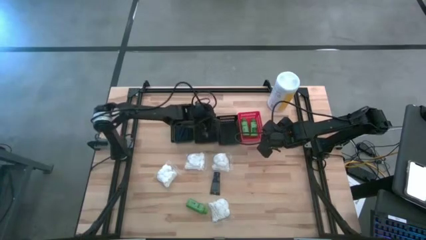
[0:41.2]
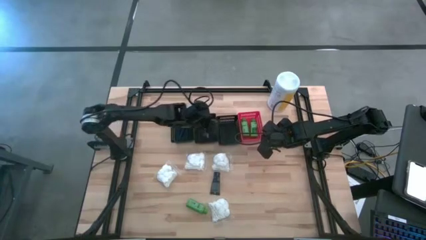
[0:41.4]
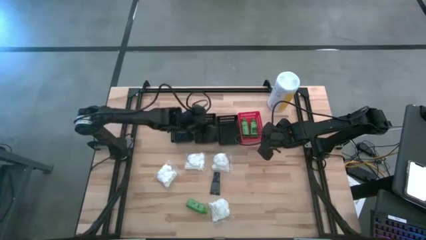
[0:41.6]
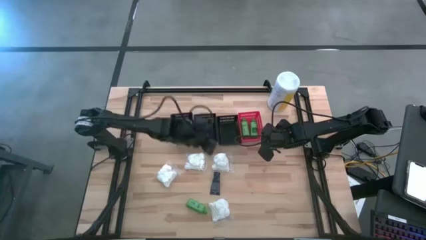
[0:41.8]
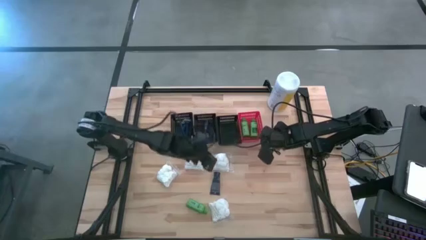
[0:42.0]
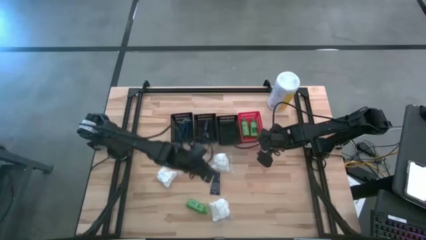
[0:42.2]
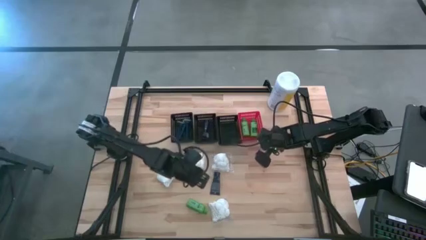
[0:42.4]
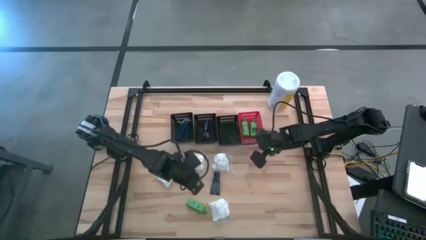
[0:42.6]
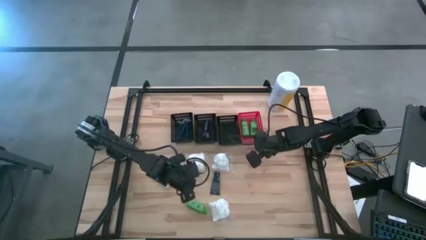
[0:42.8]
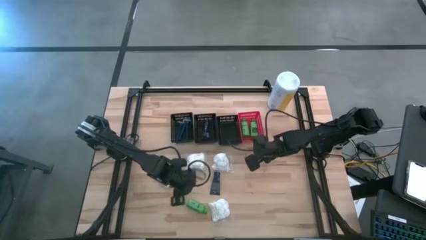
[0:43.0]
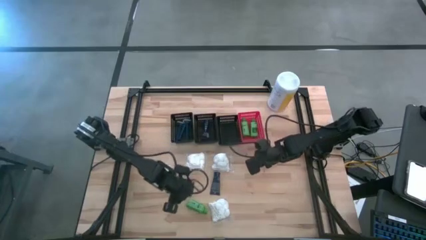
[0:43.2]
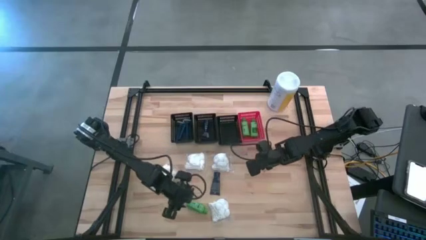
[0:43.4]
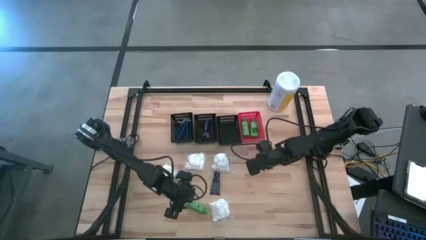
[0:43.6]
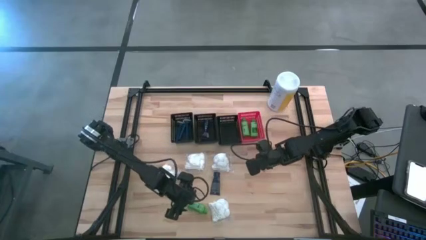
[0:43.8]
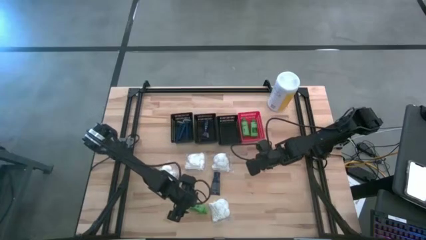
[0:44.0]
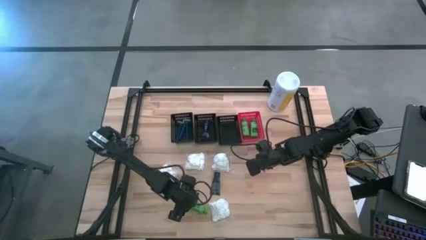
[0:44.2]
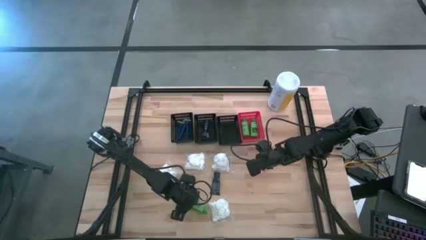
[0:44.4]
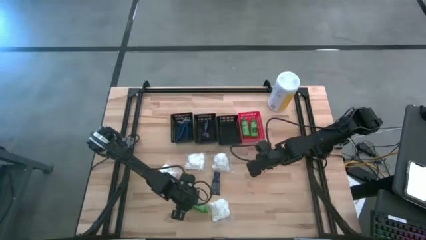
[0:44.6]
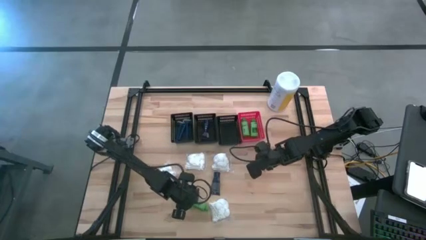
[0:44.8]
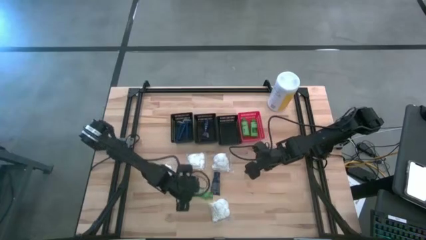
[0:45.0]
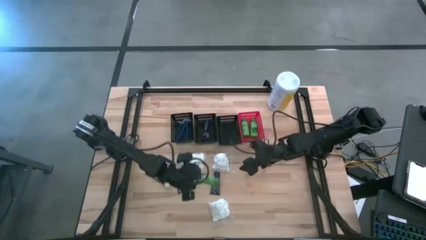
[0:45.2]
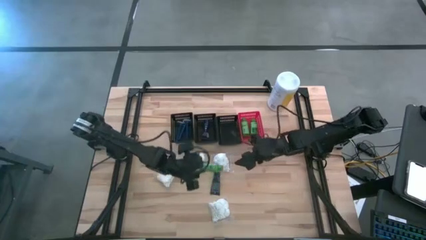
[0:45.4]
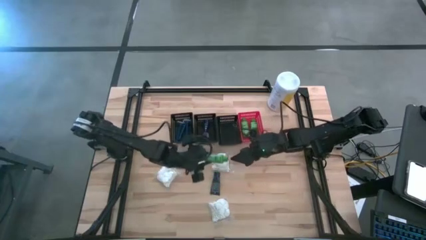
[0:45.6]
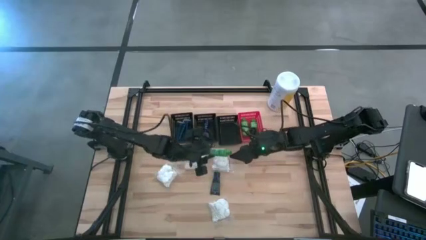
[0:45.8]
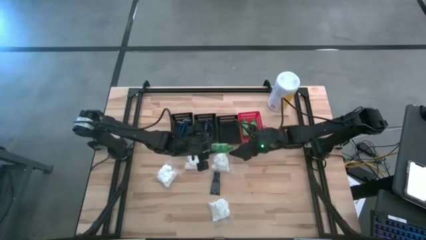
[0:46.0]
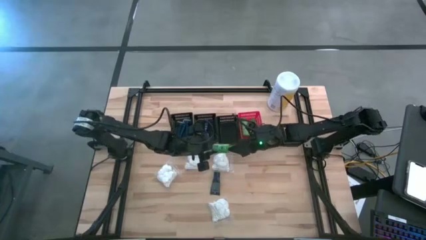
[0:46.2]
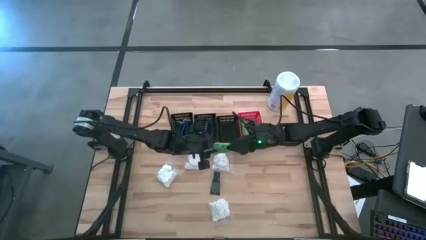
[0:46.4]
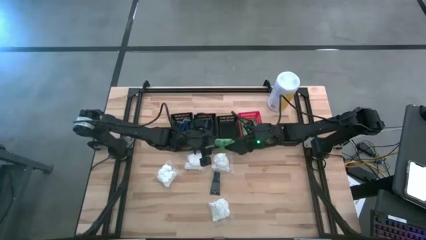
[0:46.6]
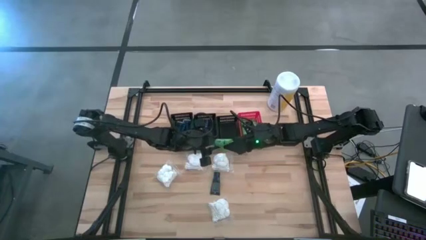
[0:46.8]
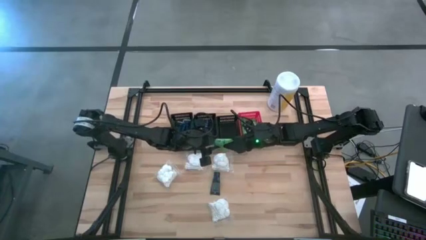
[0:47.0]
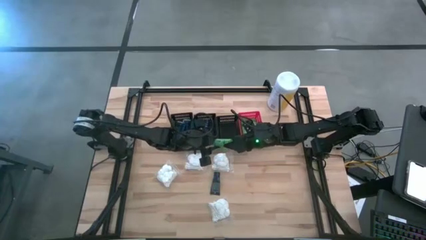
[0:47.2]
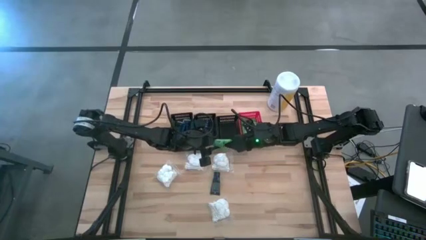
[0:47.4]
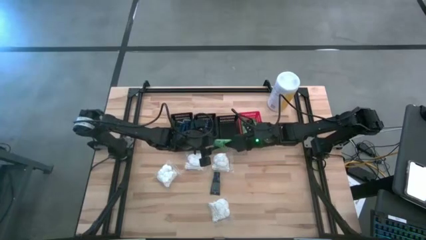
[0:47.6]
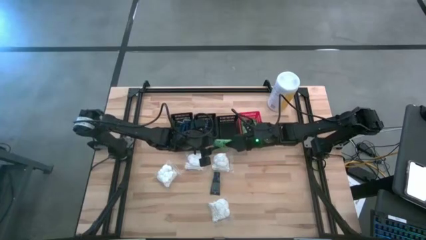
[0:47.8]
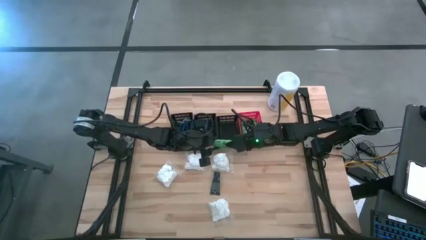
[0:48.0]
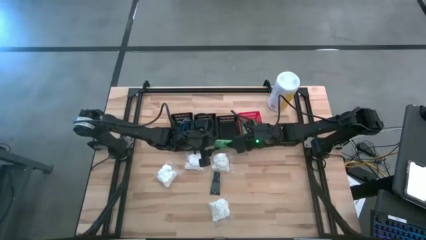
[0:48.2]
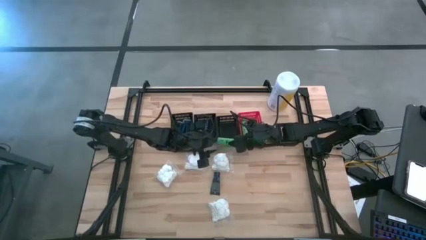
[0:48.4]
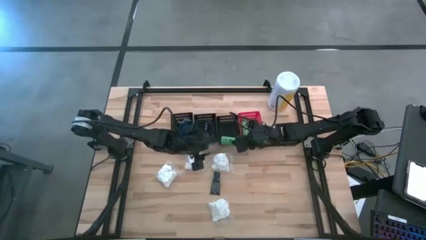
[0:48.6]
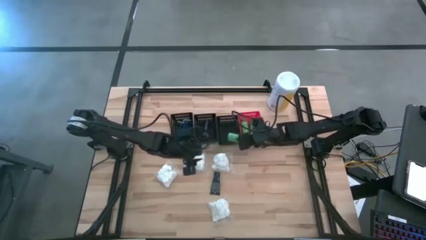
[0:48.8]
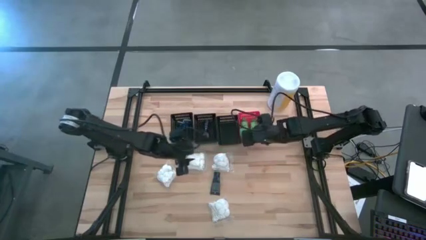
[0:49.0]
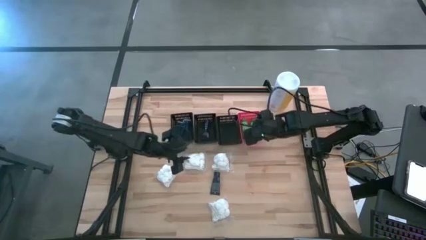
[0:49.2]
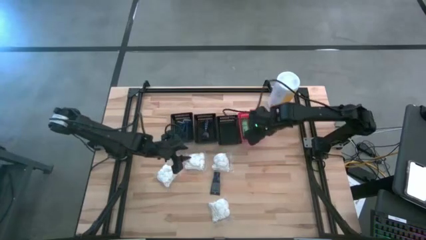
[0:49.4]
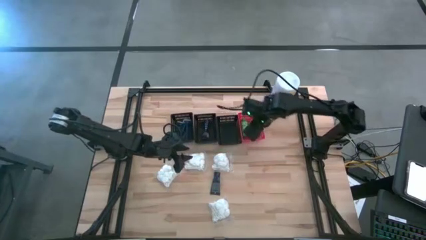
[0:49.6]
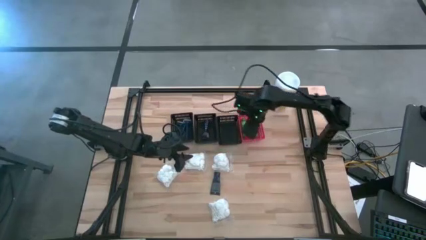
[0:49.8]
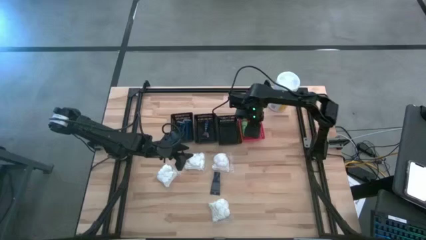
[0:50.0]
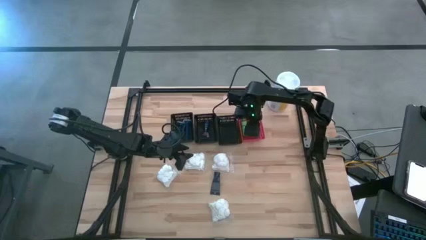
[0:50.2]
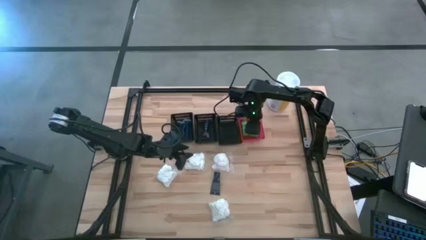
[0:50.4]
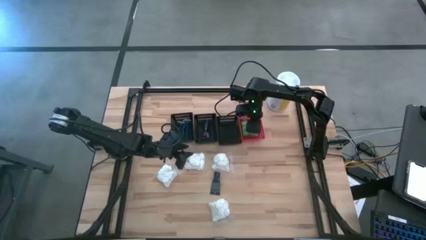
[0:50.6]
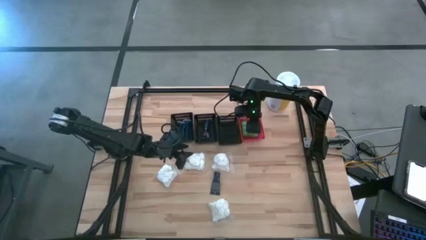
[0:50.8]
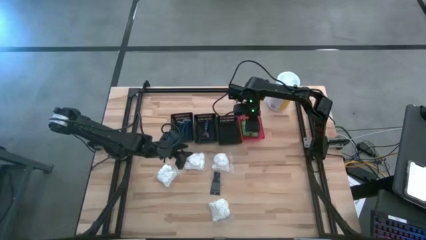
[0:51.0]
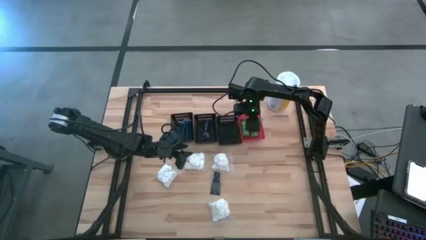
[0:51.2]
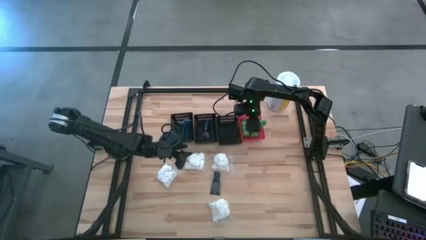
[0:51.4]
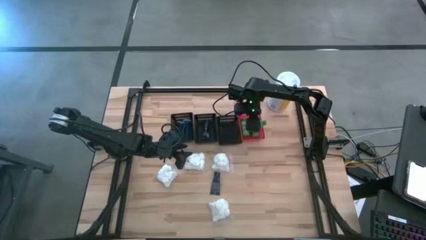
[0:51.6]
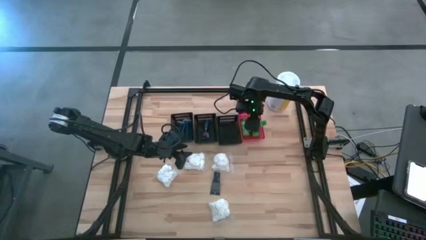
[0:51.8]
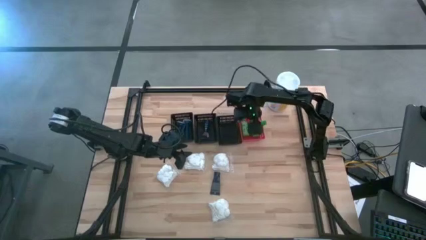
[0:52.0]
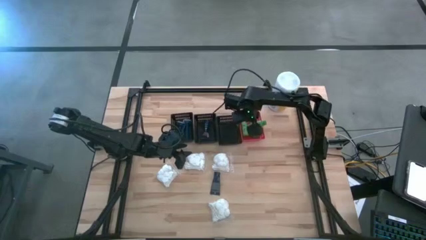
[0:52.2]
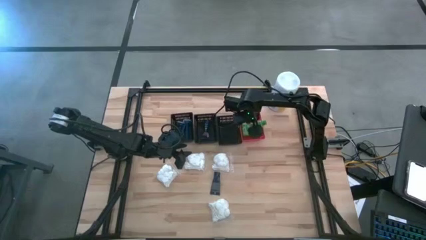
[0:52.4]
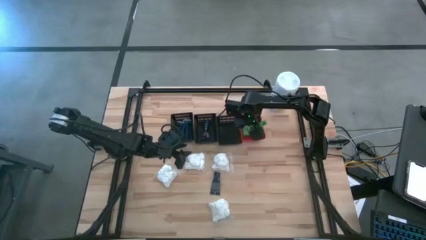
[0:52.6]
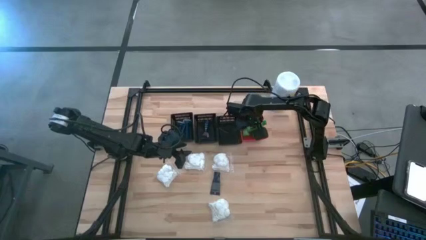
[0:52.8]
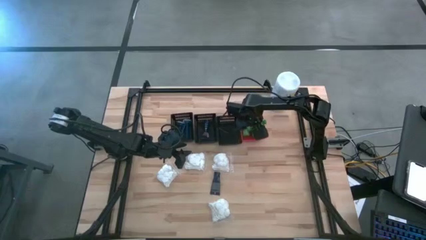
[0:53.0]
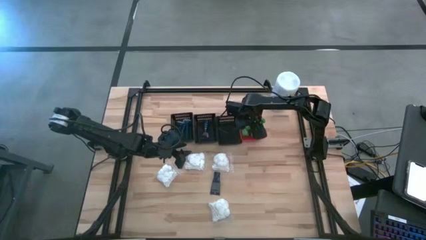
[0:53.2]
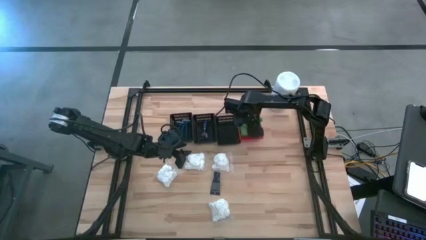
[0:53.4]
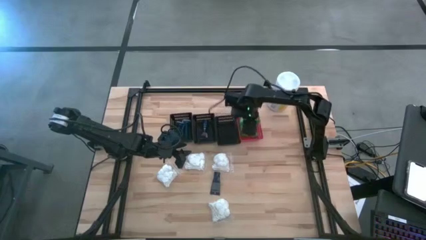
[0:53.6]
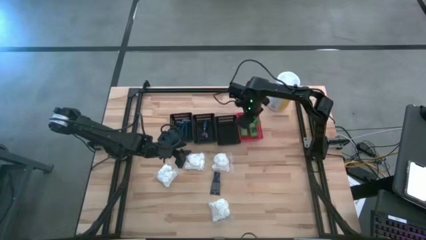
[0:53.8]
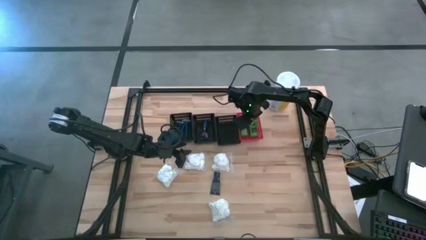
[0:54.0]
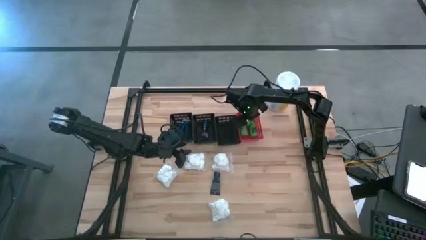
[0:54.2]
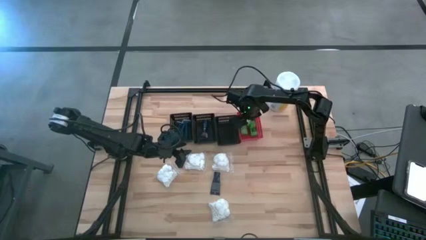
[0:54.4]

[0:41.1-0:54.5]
Task: Pick & Place Travel size toiletries
Put the green shampoo into the red bin

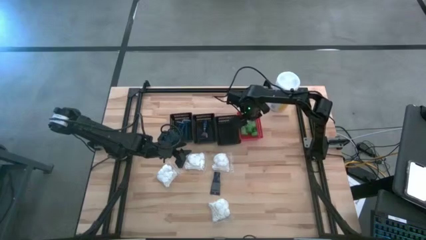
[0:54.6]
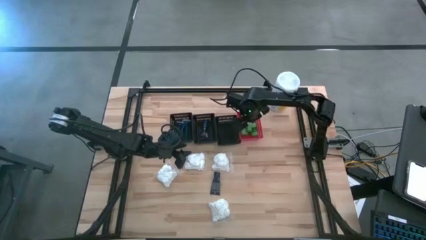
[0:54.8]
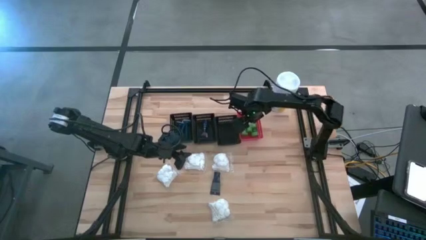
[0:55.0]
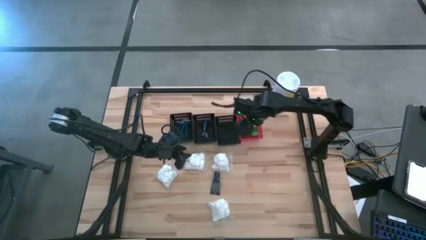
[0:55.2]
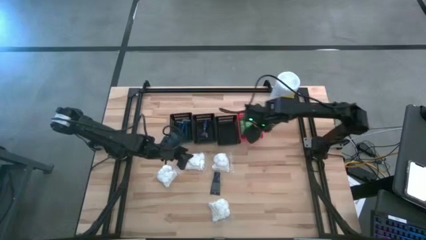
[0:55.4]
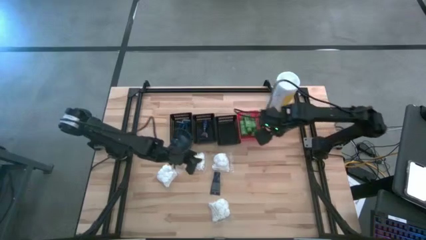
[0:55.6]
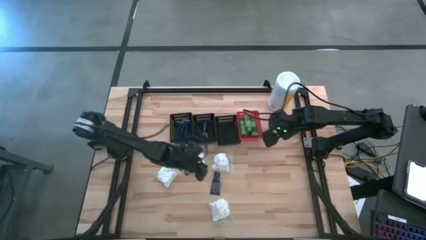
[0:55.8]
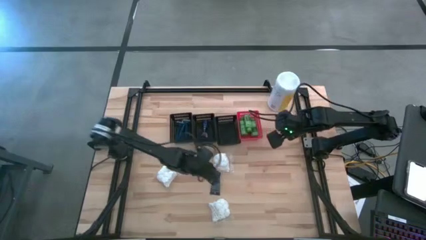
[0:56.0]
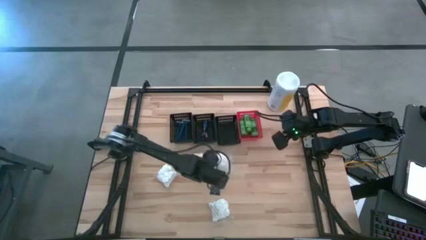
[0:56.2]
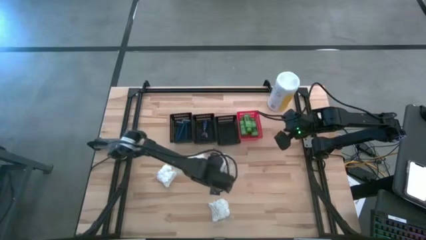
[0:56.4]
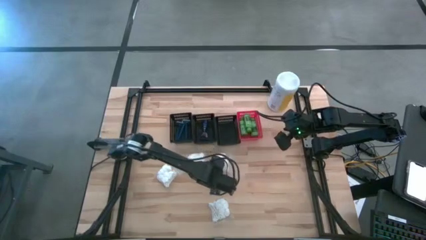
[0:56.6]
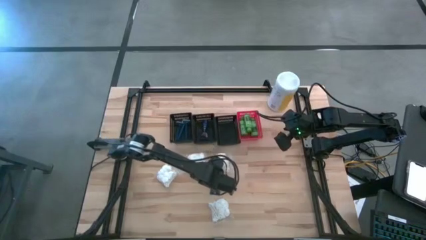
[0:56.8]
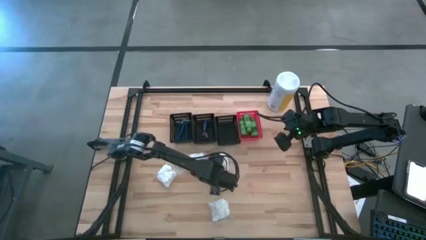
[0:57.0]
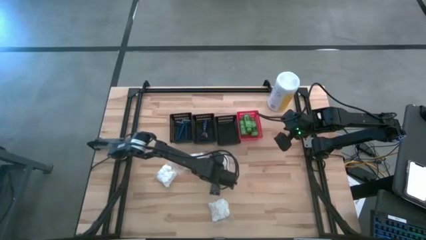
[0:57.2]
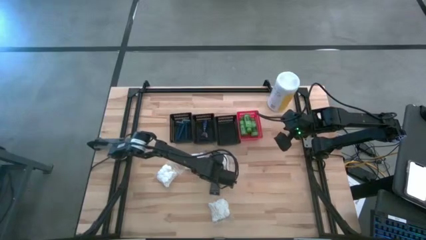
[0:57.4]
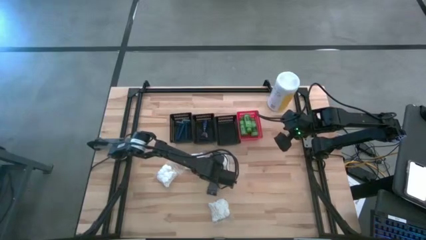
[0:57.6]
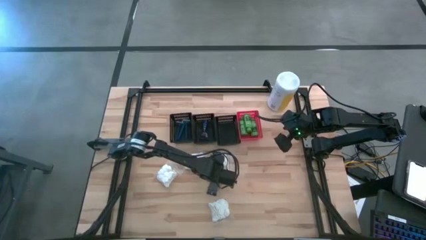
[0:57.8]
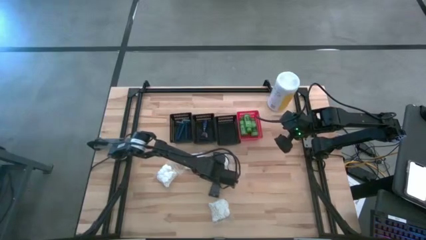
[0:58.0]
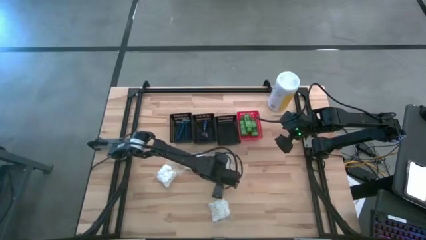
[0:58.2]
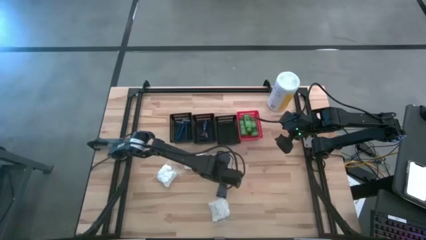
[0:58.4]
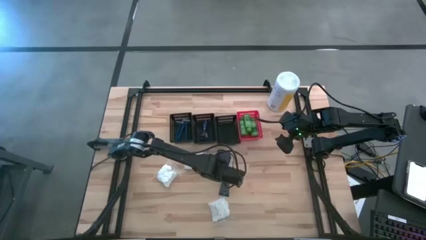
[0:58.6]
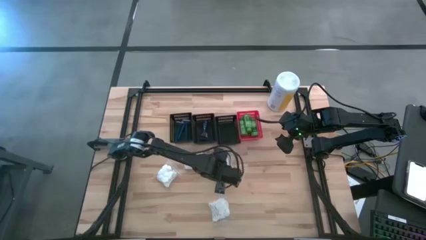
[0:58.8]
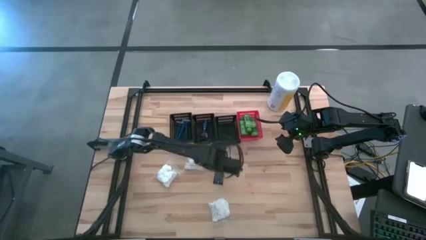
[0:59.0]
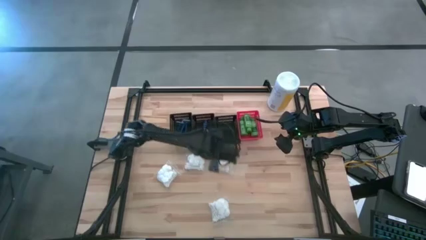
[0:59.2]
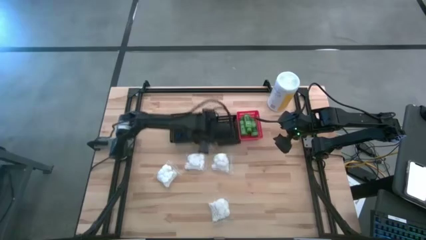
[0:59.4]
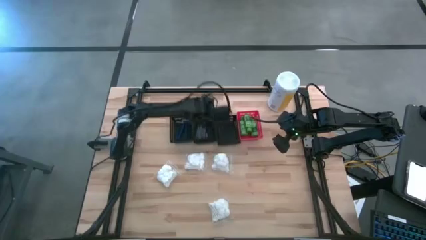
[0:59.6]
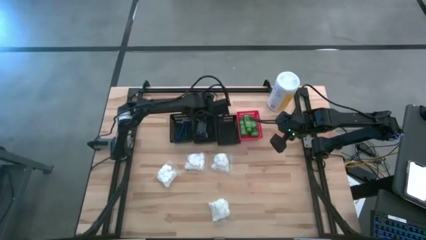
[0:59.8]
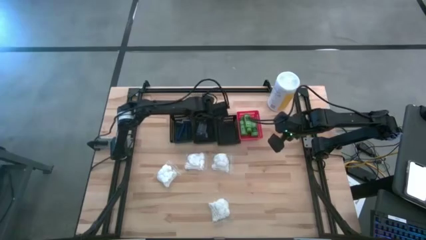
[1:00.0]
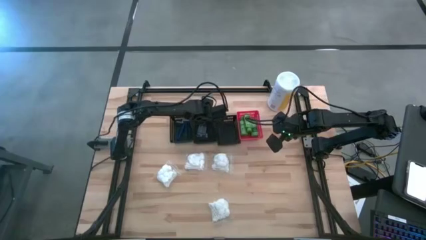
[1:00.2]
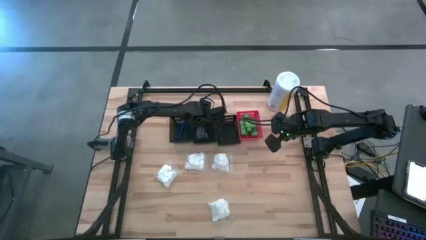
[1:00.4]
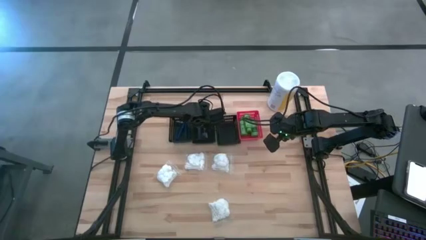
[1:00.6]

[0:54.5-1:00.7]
Put the blue shave cream into the middle black bin
